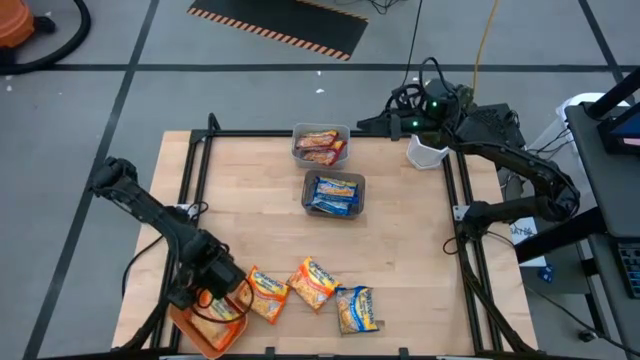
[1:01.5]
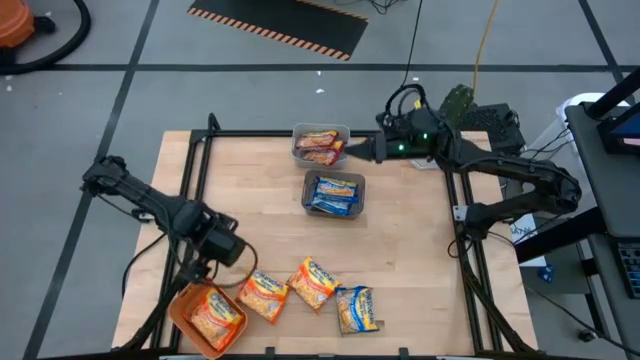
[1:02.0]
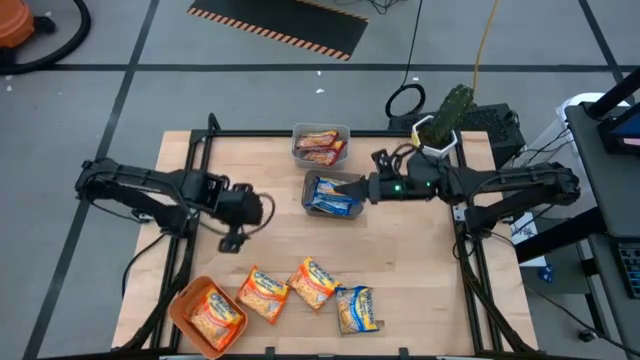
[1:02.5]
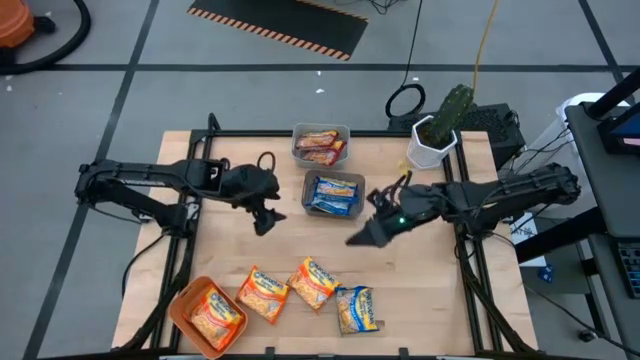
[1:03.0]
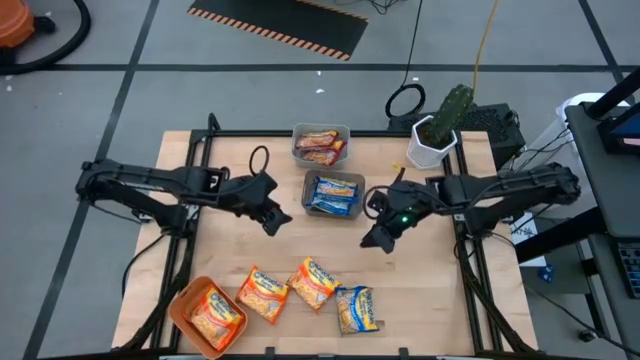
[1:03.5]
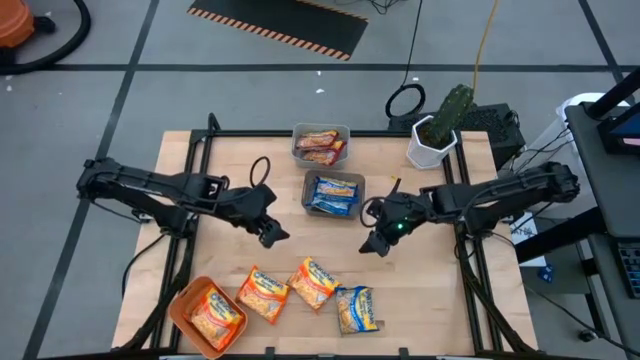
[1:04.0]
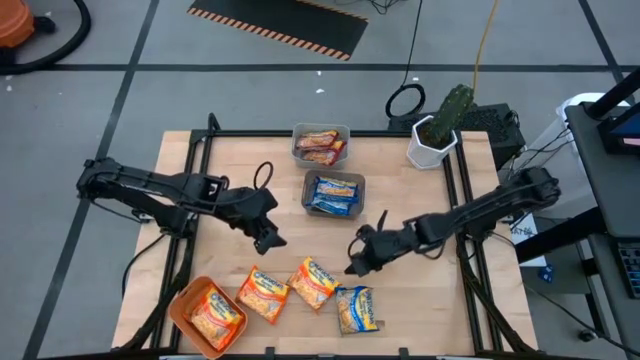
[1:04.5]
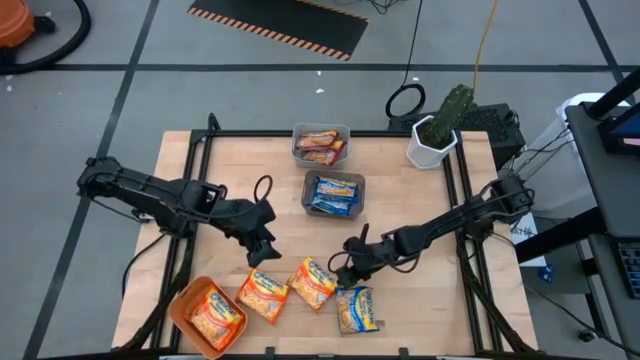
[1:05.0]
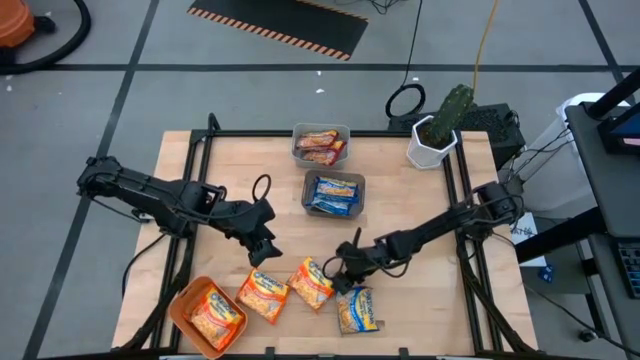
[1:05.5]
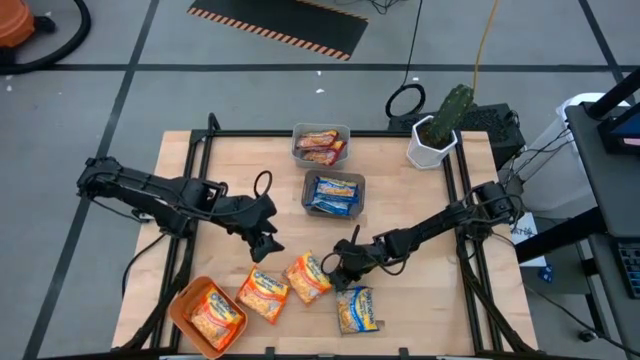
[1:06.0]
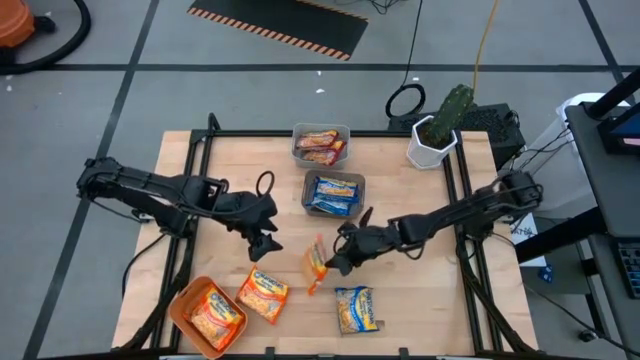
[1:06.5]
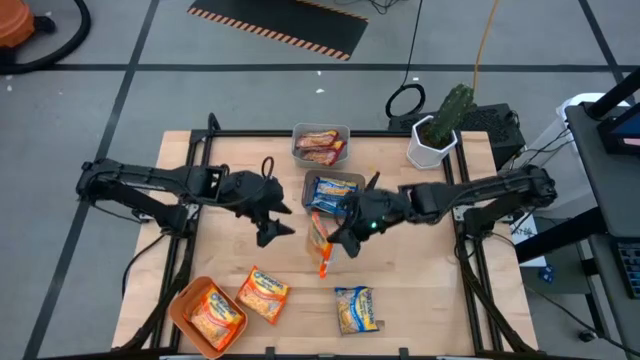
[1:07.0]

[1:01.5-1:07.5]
Task: Sort Maruchan noodles
Put the right orange noodle pack into the orange bin

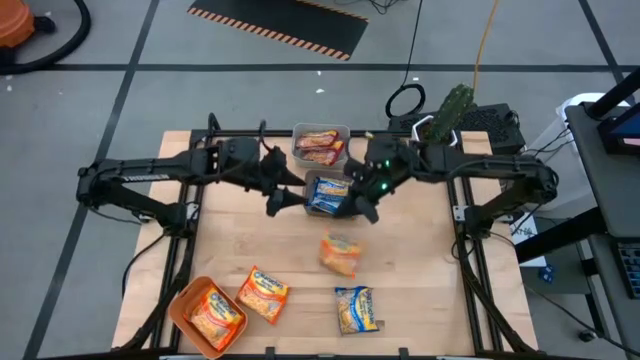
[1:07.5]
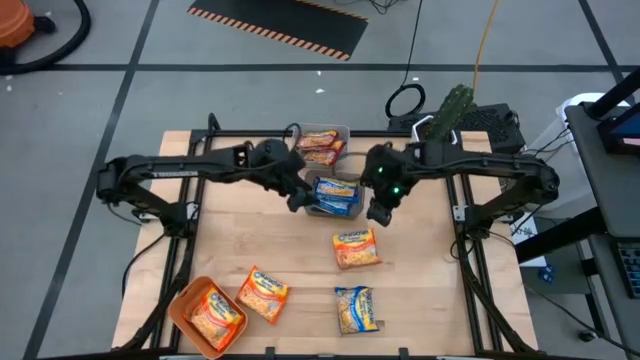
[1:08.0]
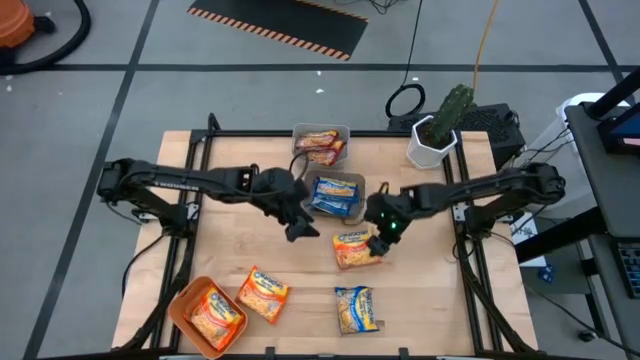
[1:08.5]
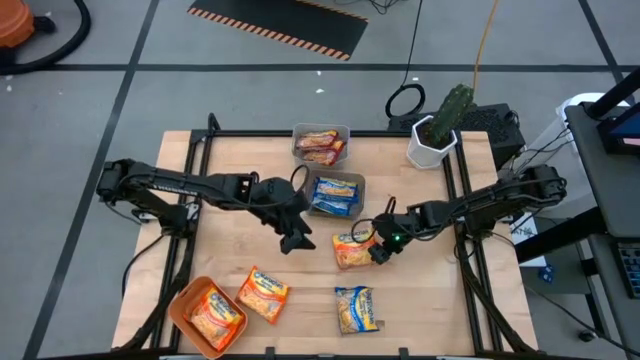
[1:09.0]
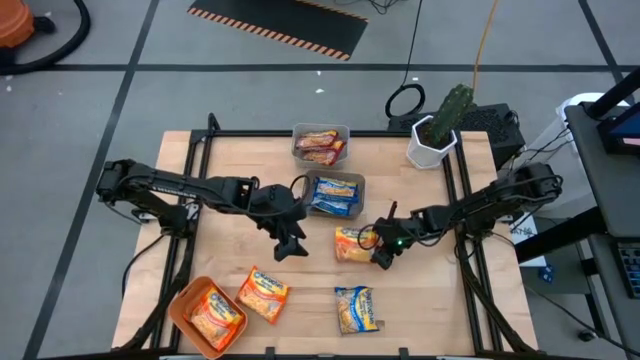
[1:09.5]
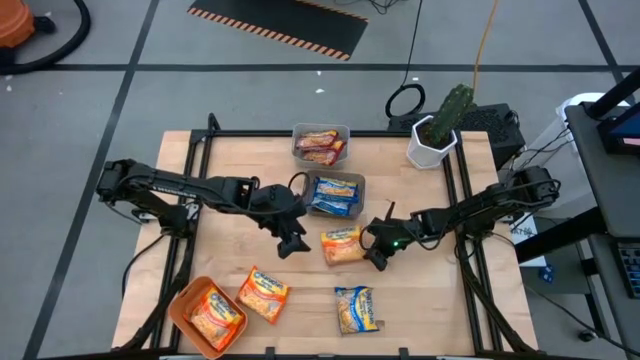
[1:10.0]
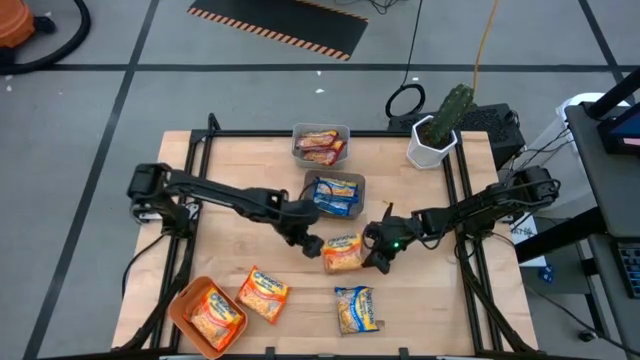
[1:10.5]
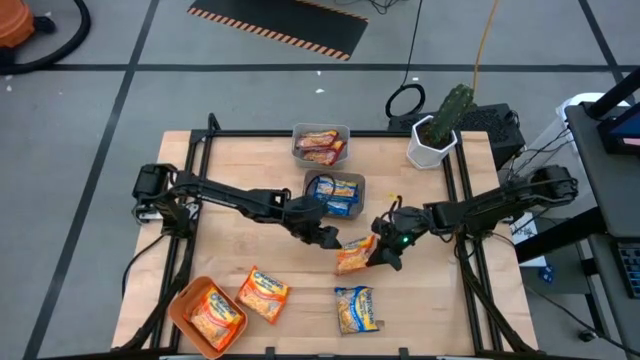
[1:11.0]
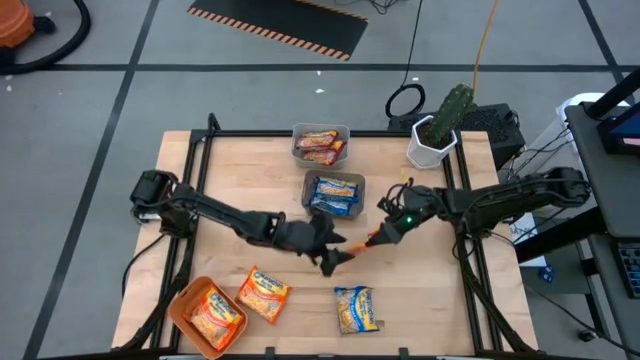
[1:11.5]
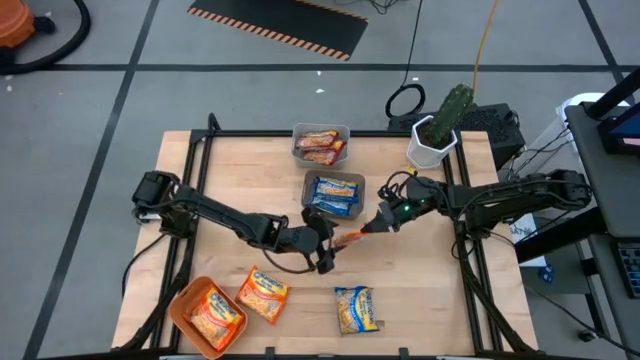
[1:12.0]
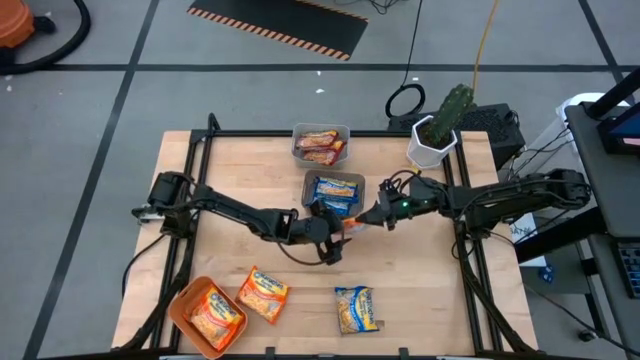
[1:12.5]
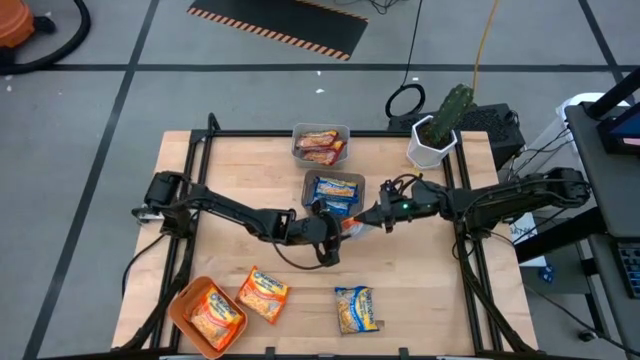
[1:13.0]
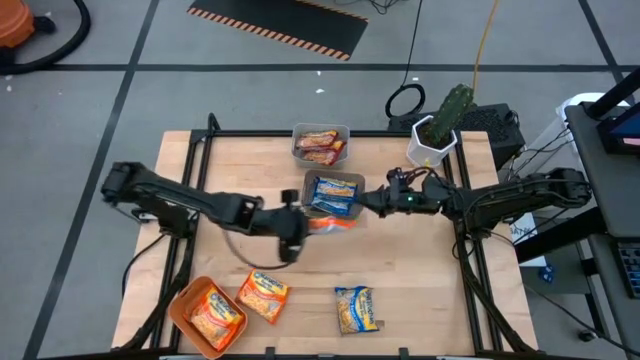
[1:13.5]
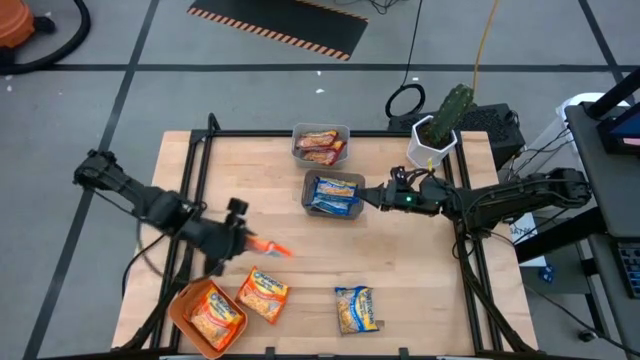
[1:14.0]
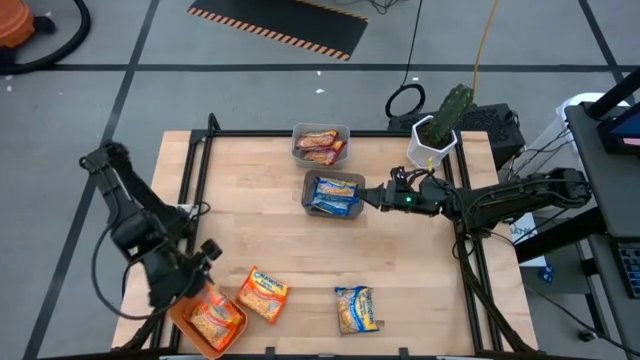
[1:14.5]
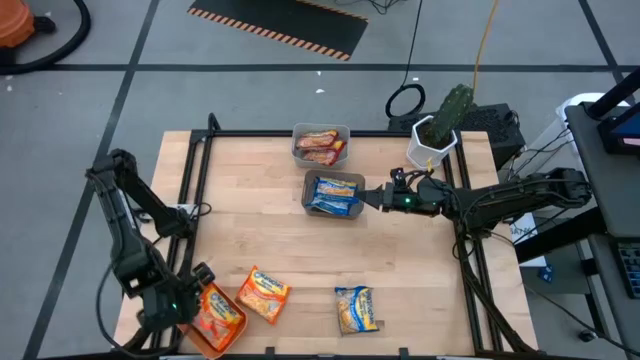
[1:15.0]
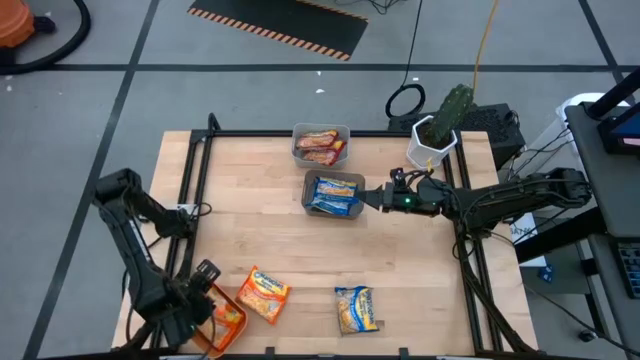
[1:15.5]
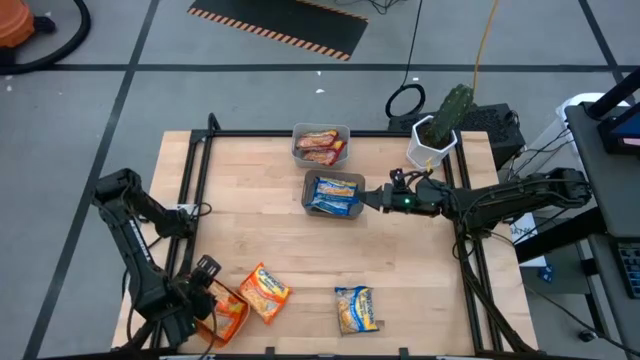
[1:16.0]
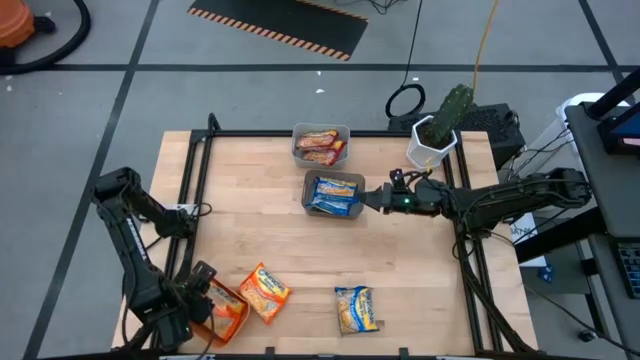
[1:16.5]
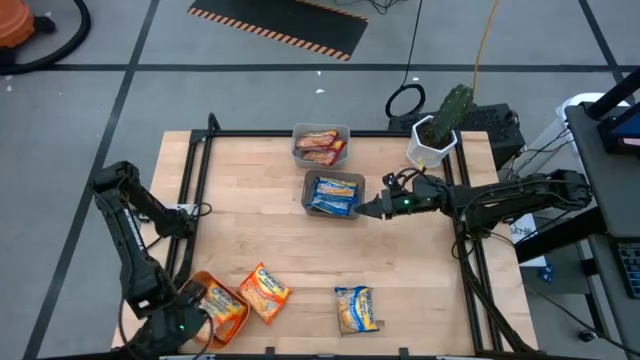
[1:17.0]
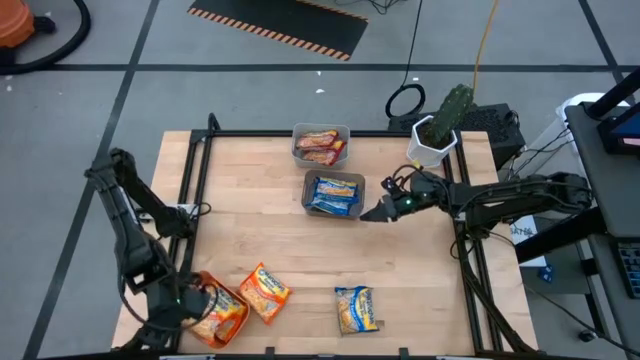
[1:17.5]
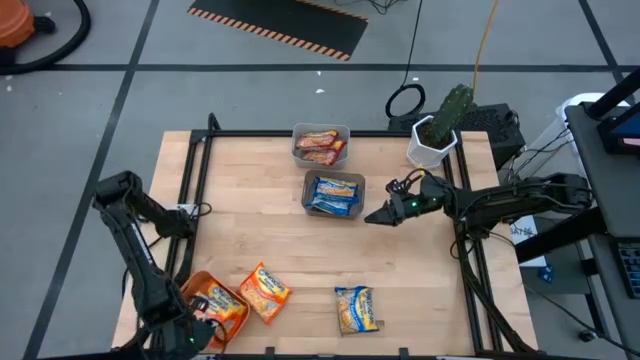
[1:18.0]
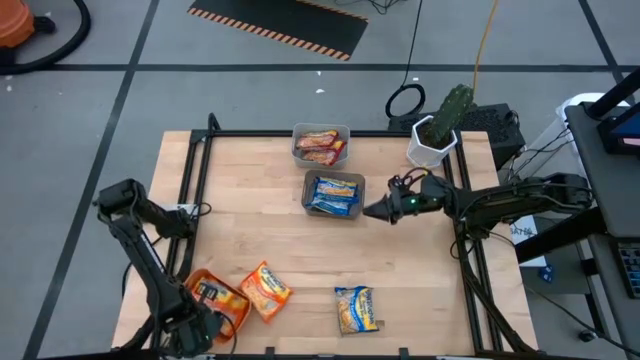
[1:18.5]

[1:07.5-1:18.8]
Put the right orange noodle pack into the orange bin

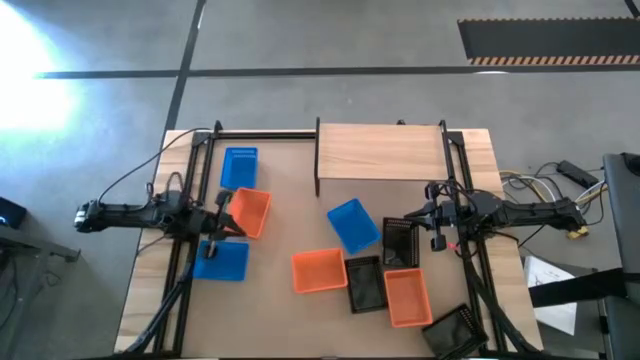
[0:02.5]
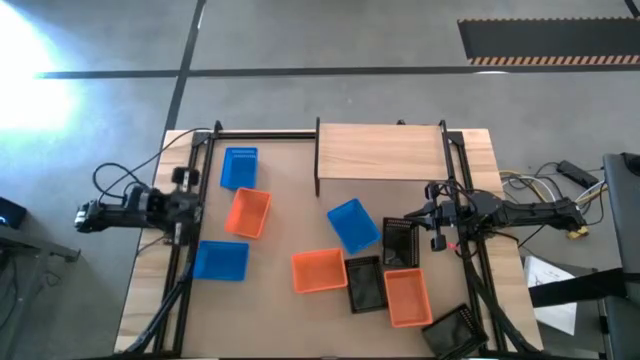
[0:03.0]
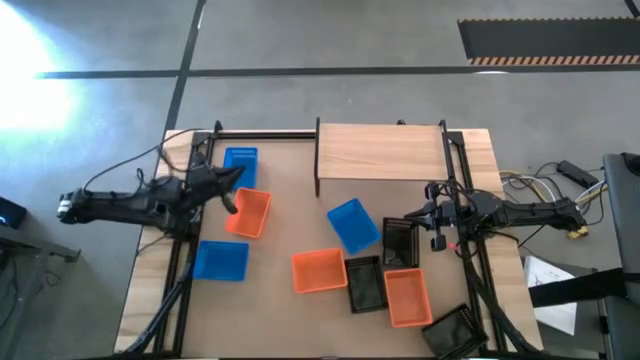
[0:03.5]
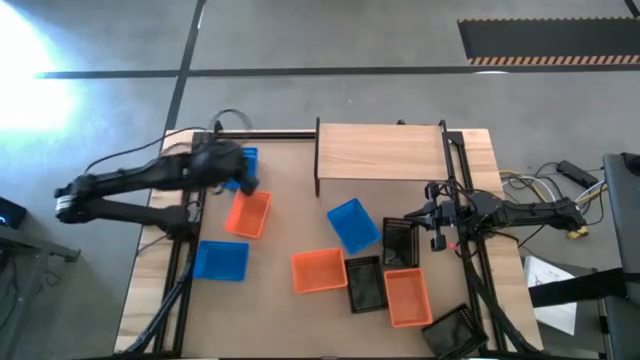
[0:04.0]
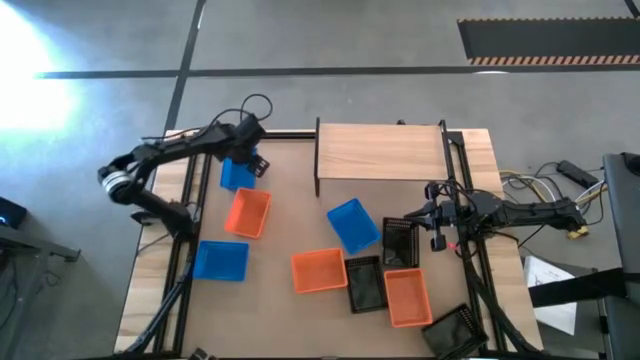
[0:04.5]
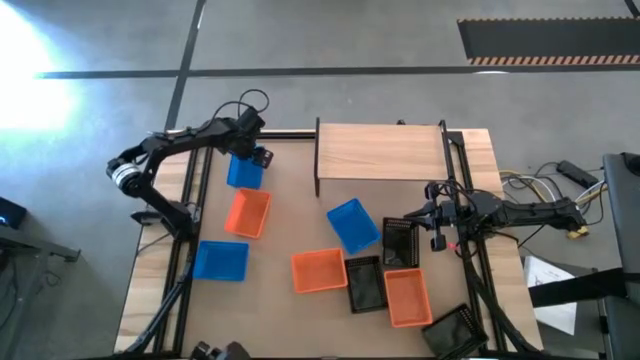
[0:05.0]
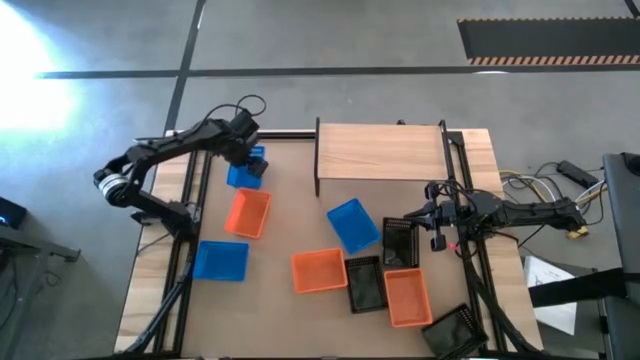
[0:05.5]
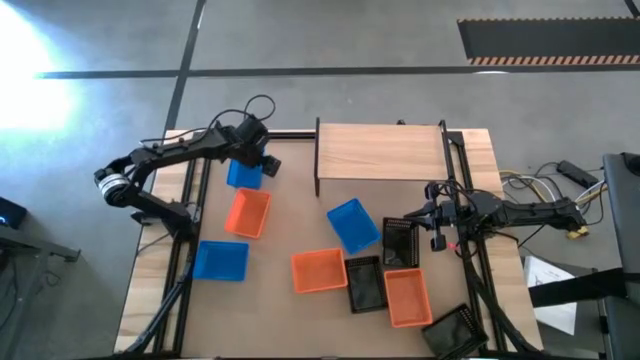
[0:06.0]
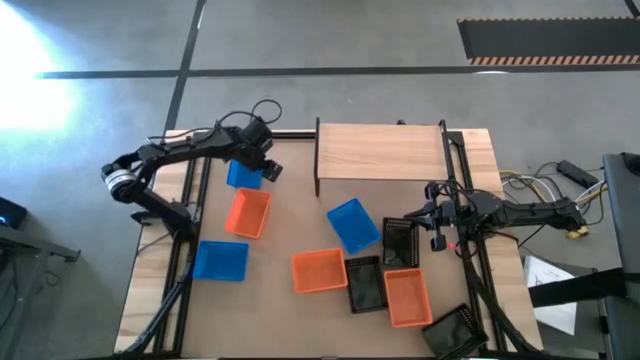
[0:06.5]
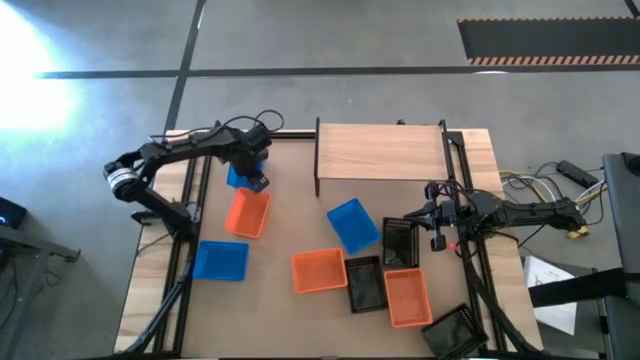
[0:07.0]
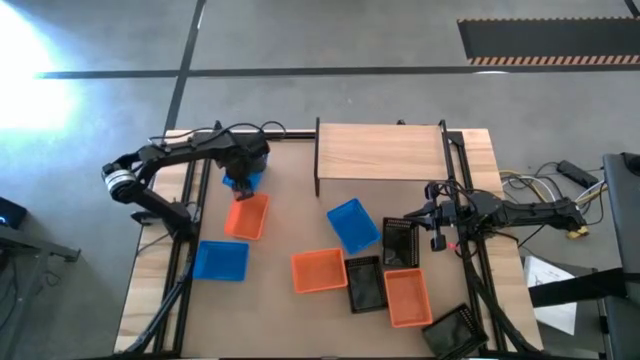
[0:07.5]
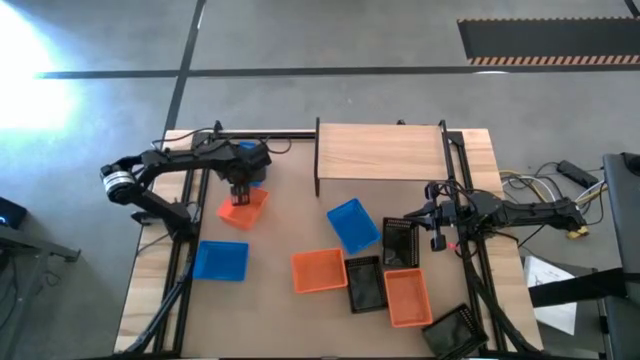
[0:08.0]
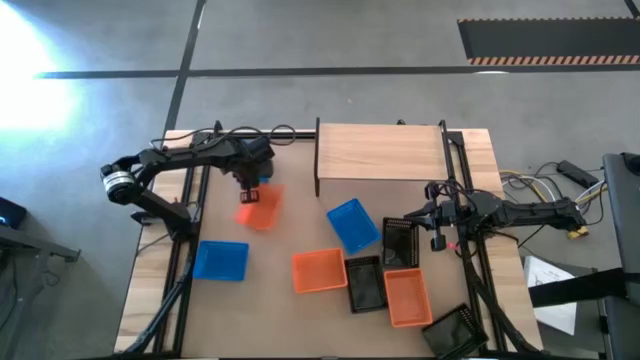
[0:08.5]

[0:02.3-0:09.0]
Task: Stack baskets on shelf by color
Put the top blue bin on the shelf
